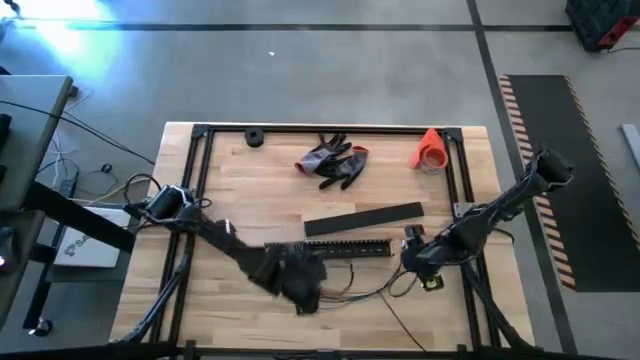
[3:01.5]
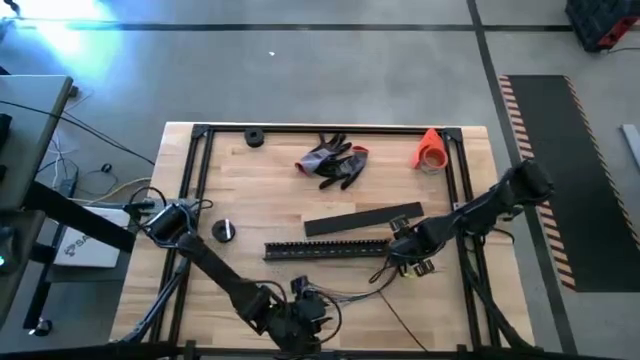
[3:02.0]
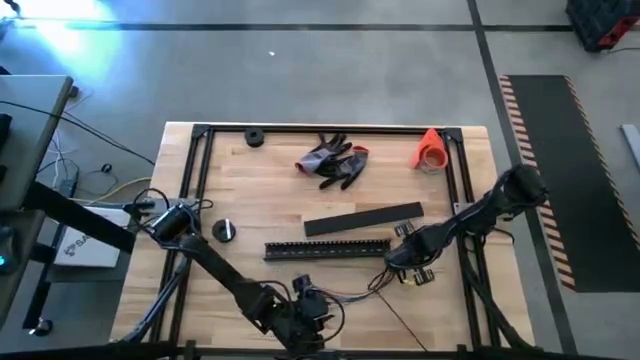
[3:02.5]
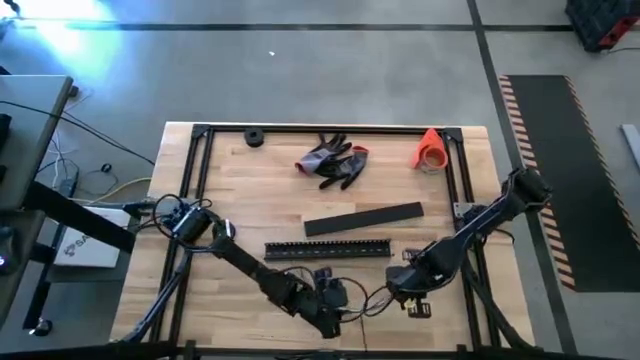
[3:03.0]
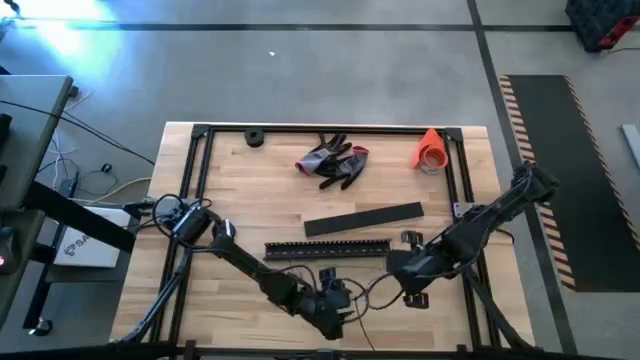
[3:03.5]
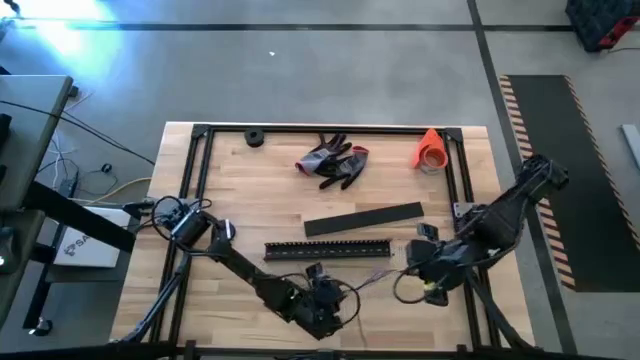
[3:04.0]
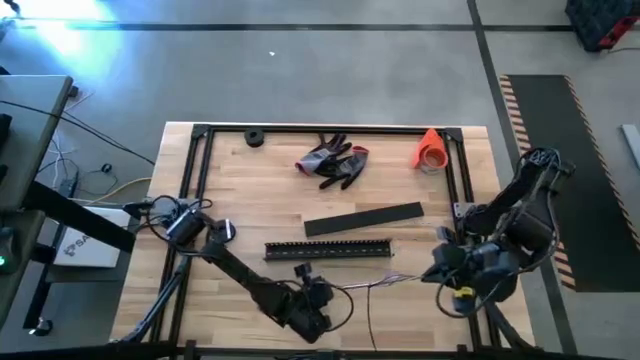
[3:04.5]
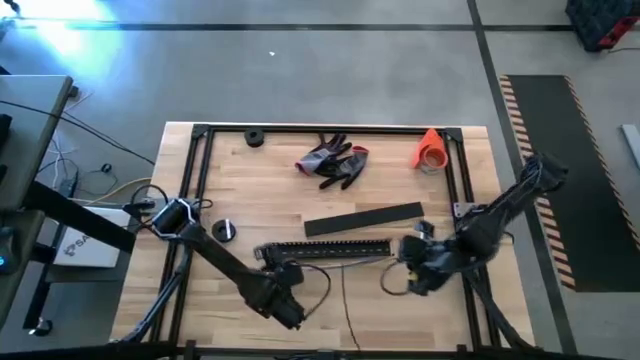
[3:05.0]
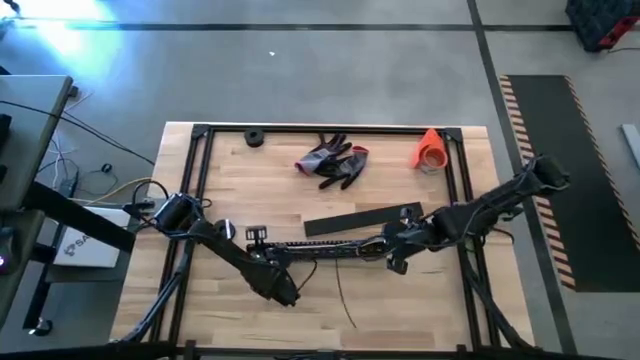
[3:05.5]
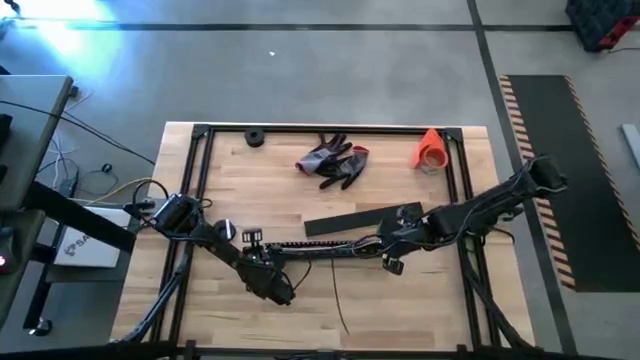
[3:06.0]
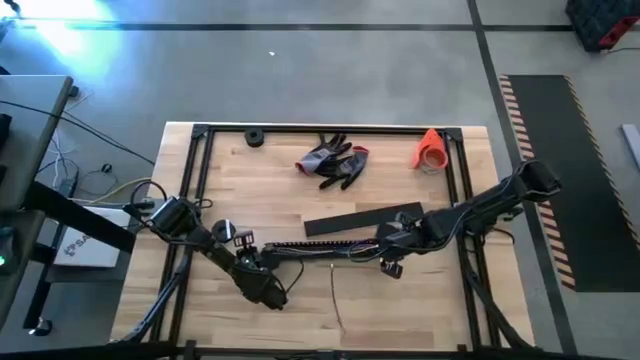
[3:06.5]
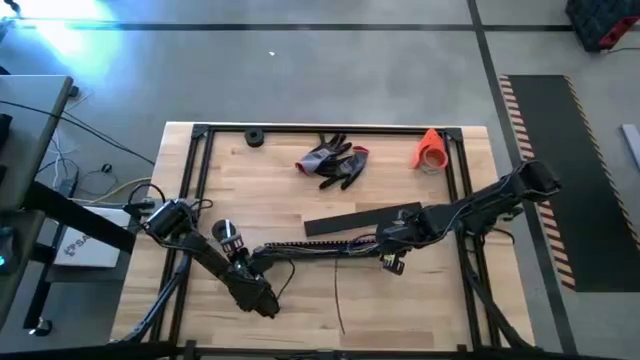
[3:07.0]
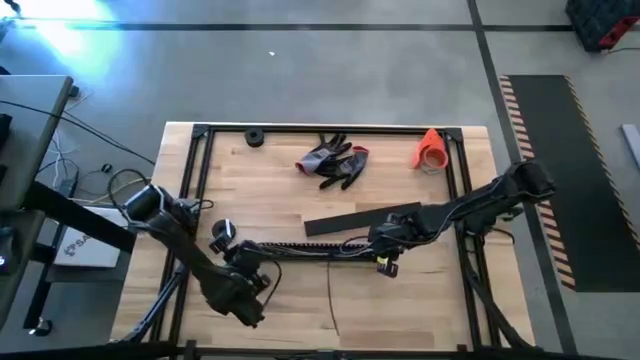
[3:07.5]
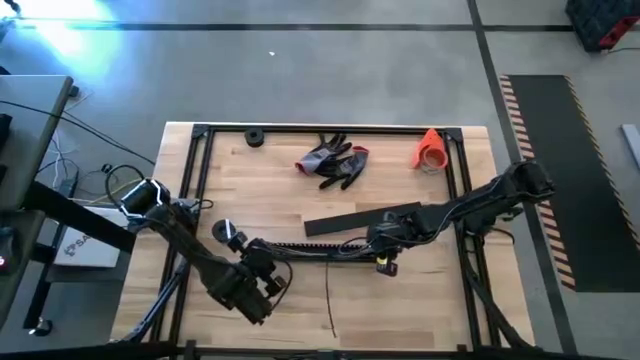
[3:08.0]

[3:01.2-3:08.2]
Task: Ziptie cables
Put the black zip tied cables into the black cable duct

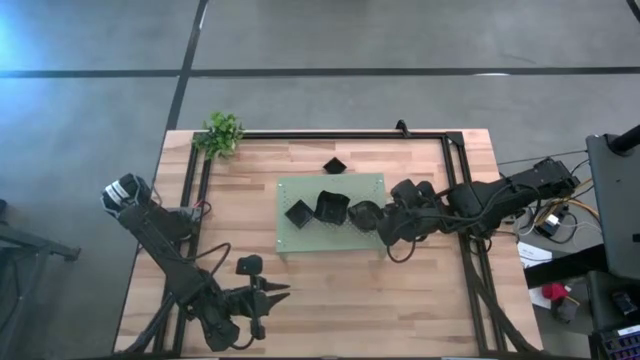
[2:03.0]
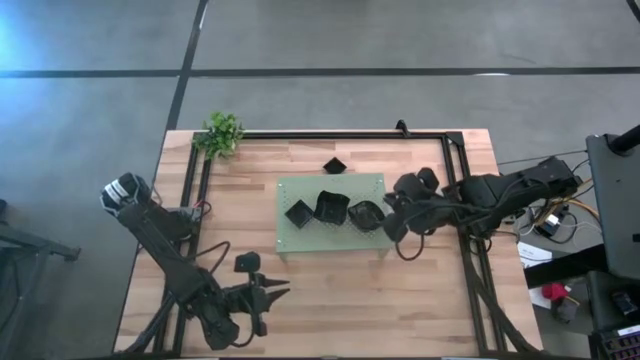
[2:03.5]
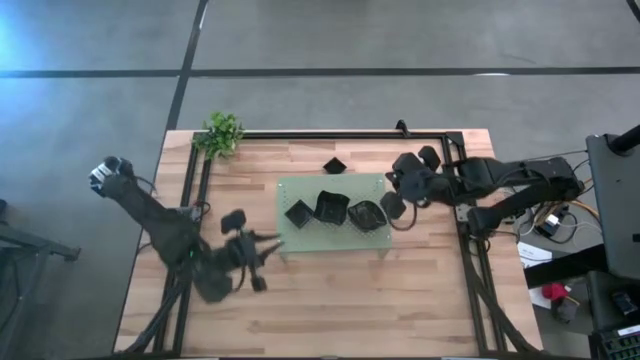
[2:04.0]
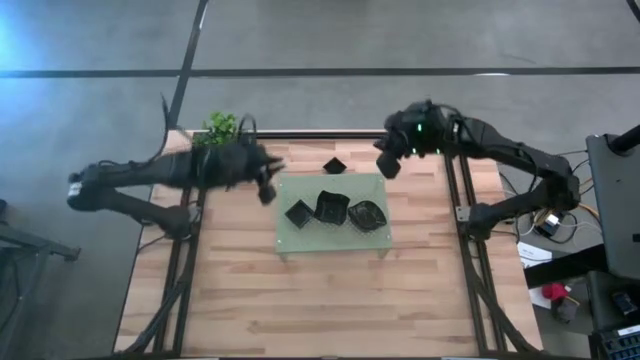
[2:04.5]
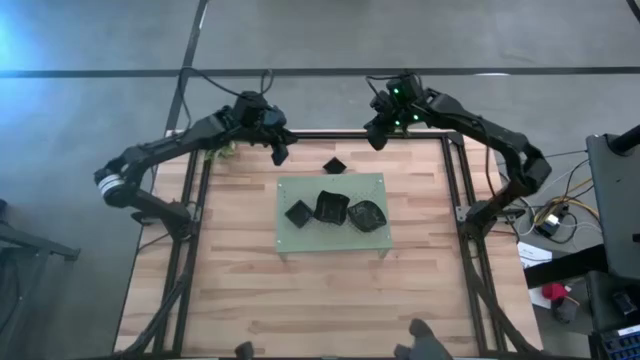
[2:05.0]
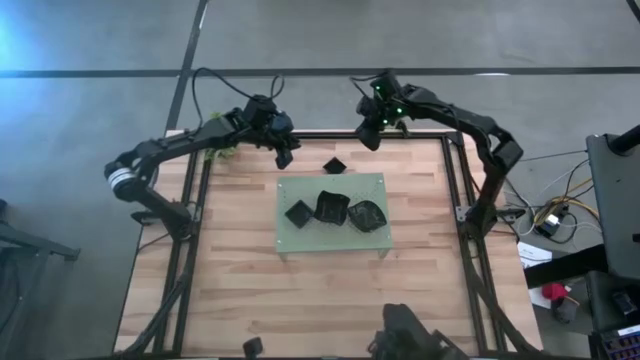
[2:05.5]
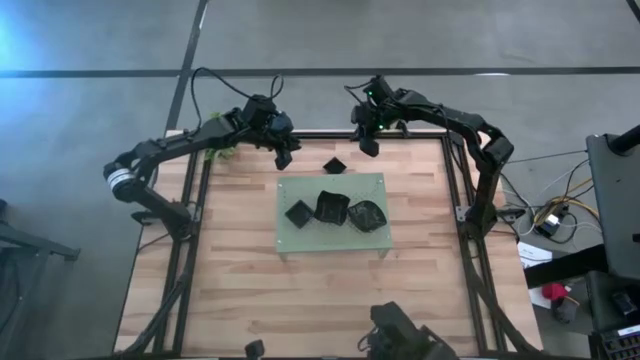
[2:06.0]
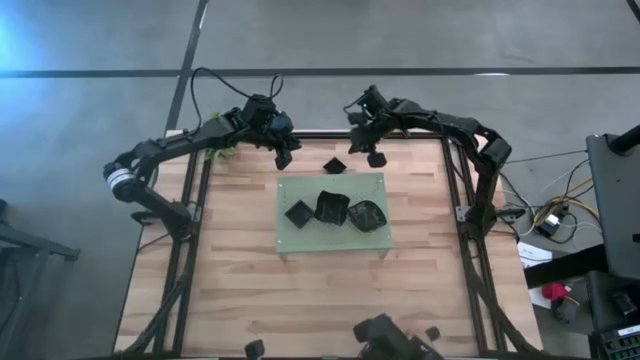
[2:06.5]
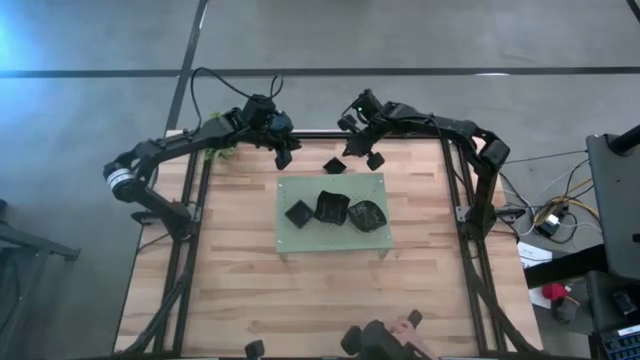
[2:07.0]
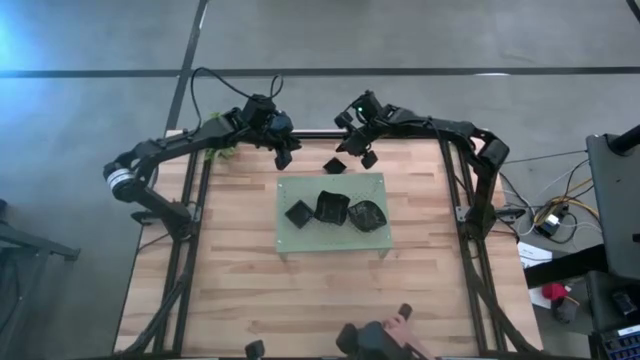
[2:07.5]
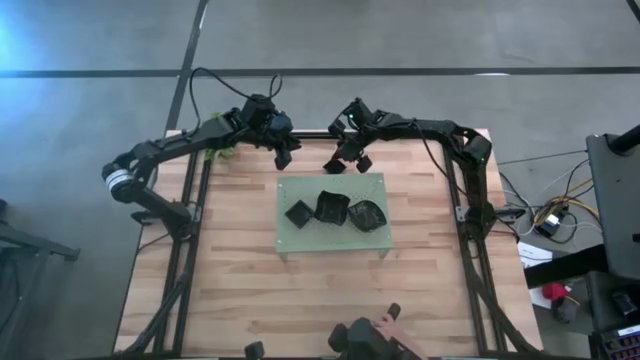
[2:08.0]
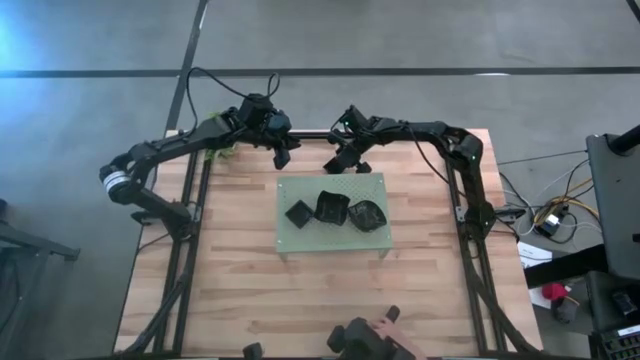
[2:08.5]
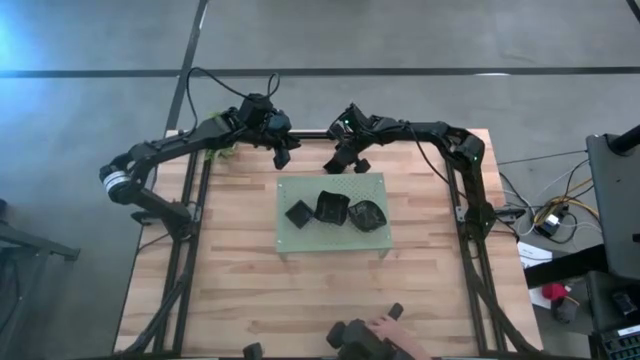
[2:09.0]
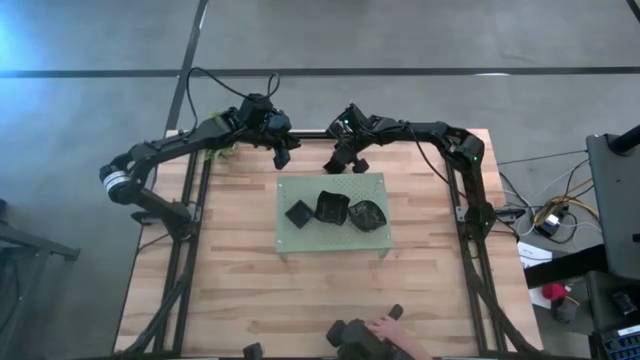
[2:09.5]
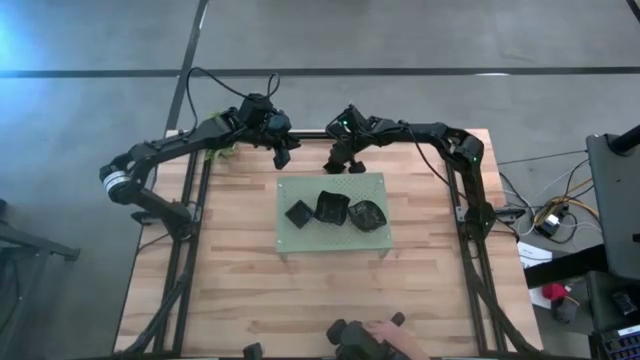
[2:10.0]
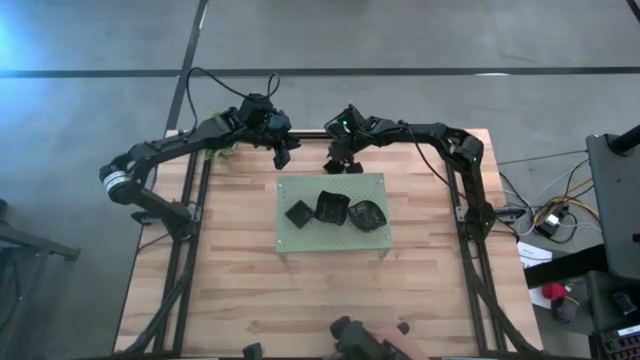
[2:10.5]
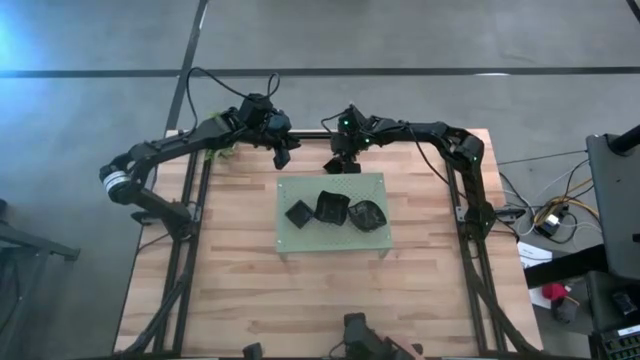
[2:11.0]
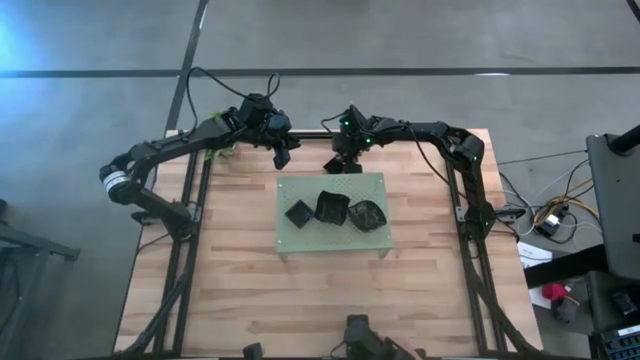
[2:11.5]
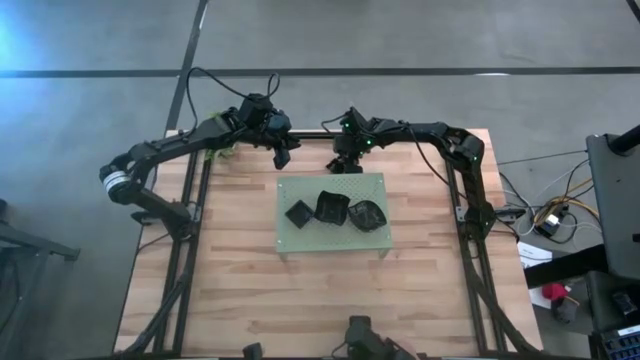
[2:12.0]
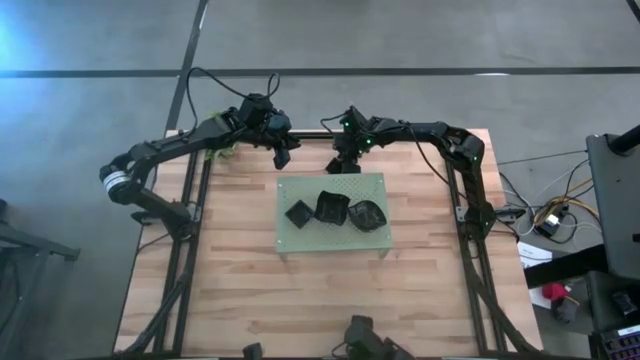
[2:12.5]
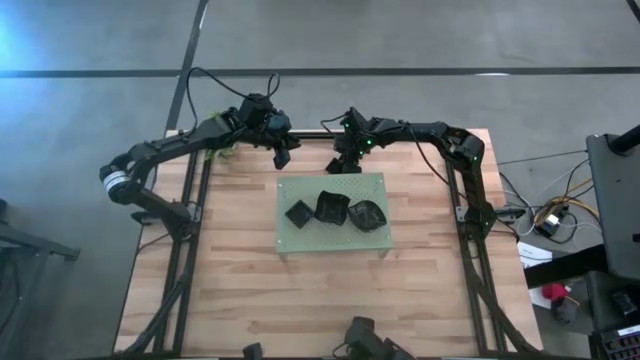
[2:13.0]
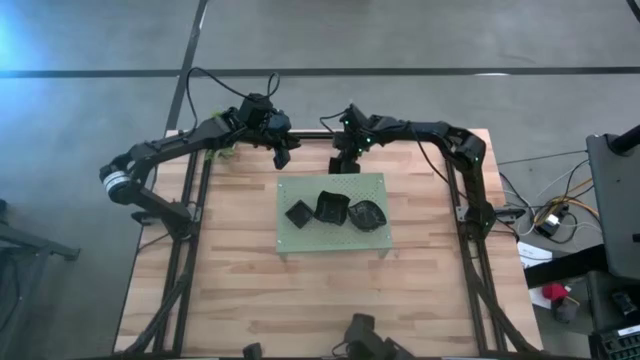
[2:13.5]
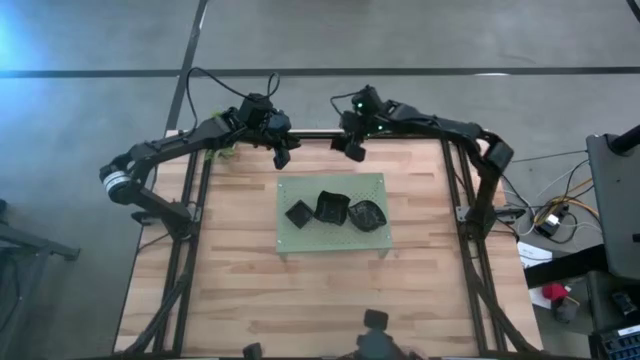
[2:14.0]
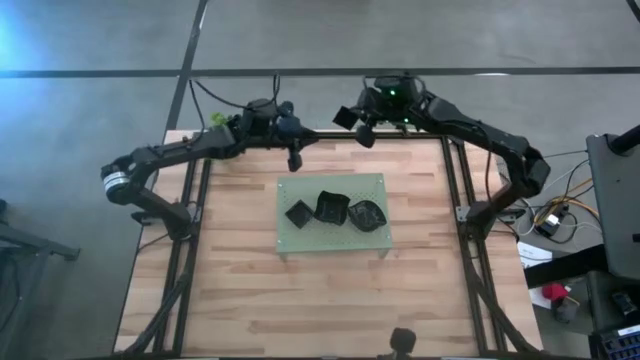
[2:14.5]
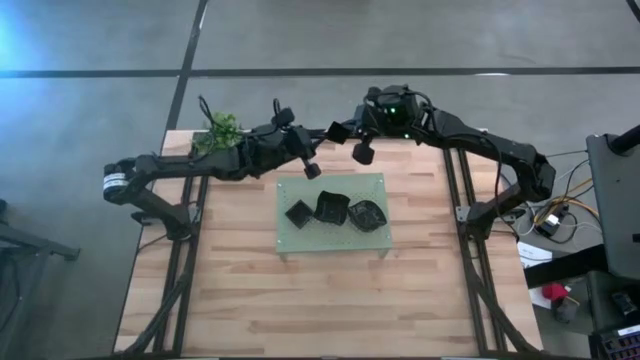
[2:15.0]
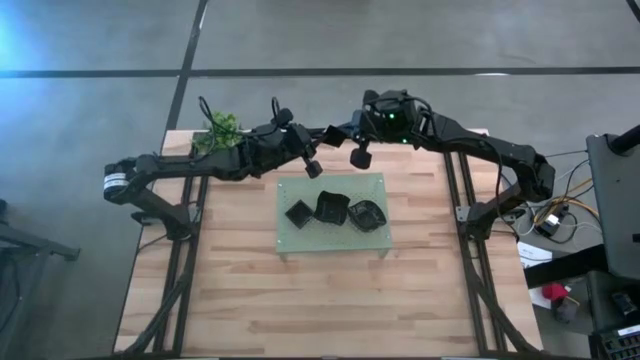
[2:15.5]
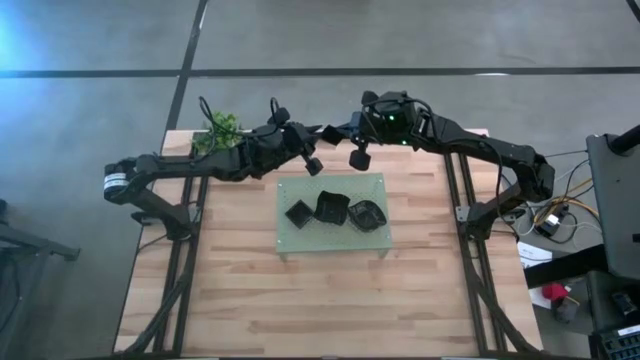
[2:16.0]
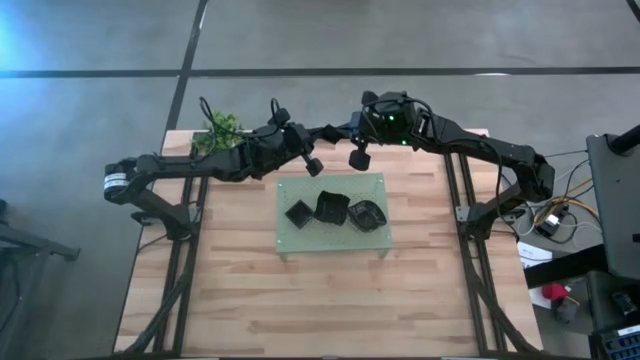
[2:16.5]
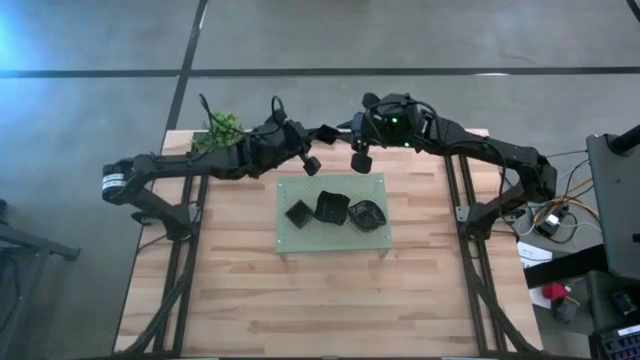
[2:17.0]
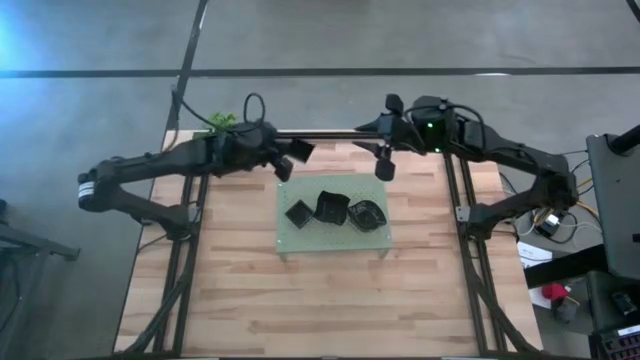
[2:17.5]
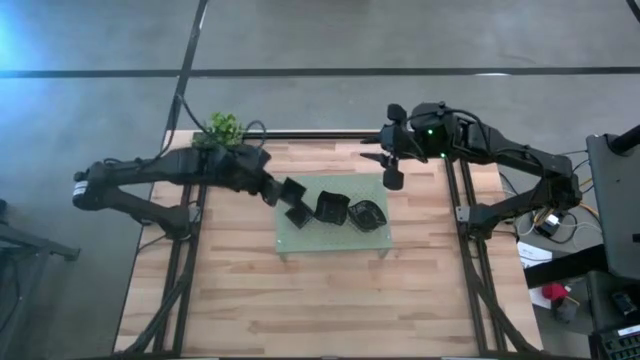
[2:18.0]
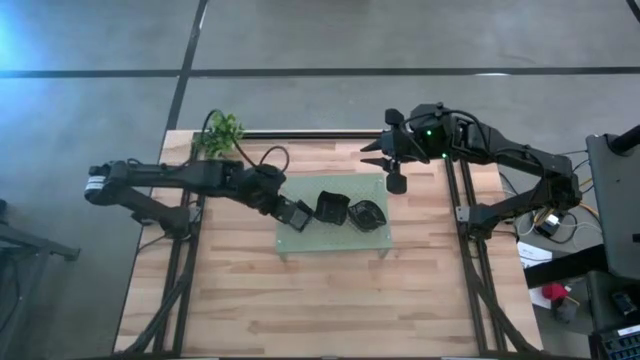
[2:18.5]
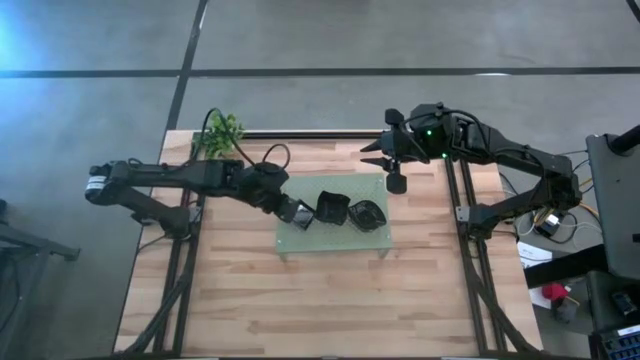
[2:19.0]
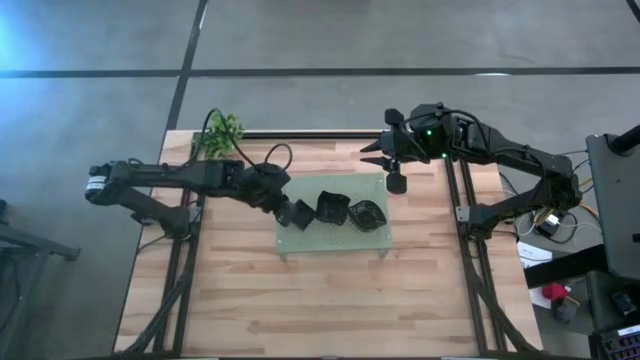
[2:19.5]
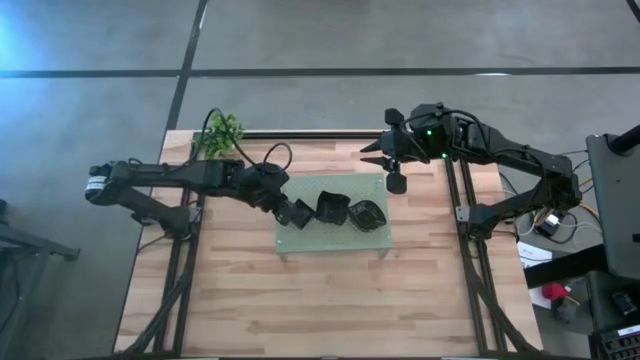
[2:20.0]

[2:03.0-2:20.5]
Task: Pick & Place Mini shaped plates
Stack the square plate on top of the square plate on the shelf
